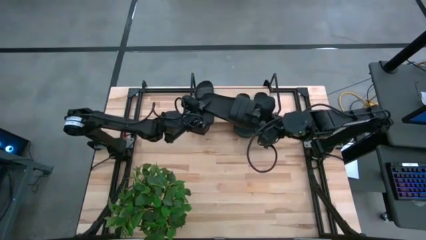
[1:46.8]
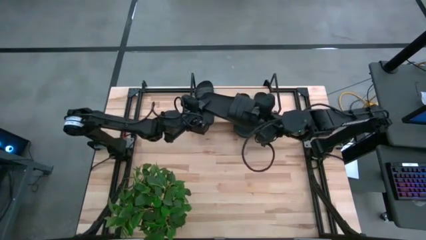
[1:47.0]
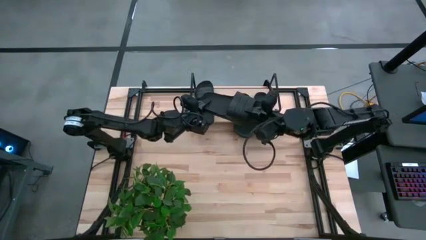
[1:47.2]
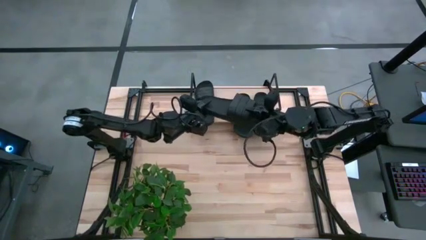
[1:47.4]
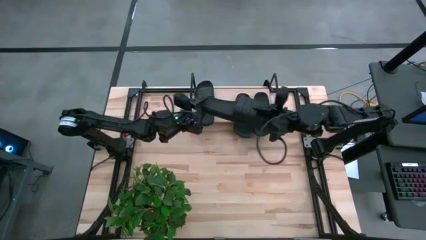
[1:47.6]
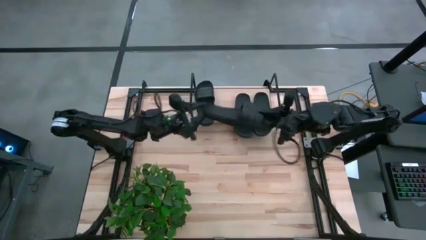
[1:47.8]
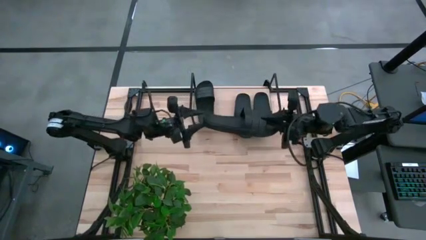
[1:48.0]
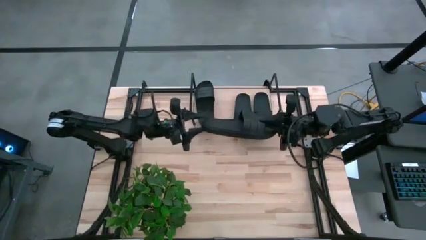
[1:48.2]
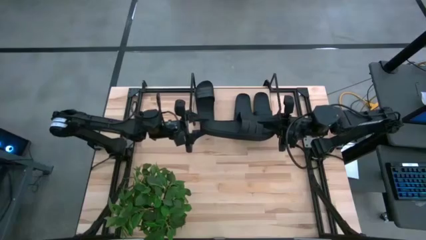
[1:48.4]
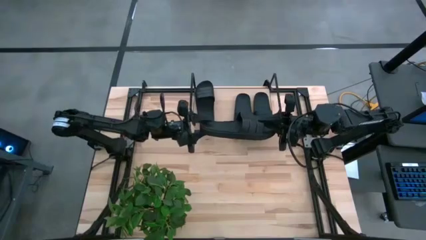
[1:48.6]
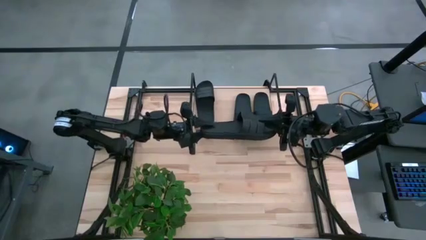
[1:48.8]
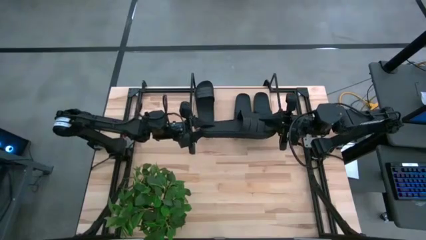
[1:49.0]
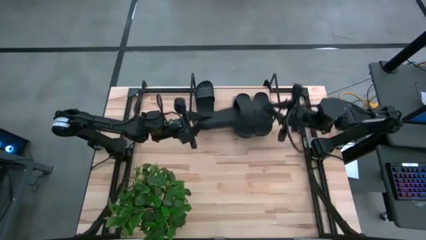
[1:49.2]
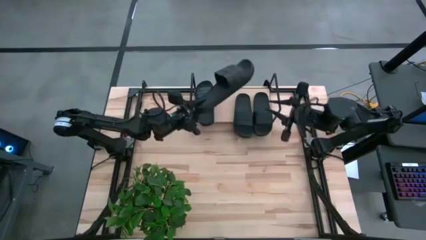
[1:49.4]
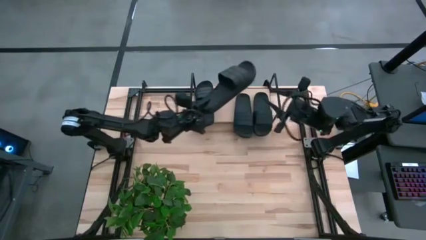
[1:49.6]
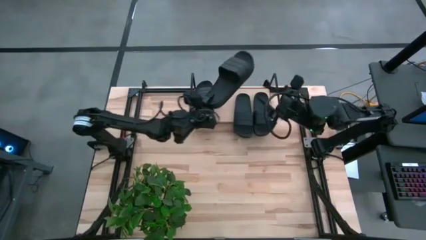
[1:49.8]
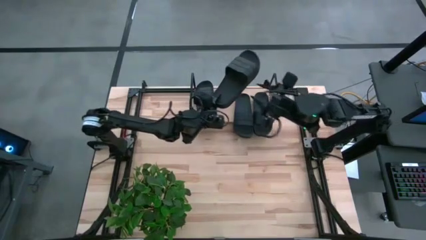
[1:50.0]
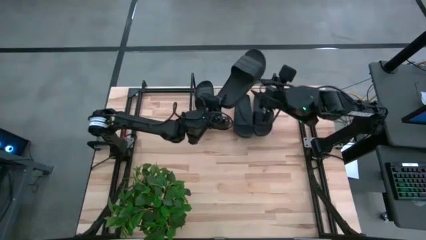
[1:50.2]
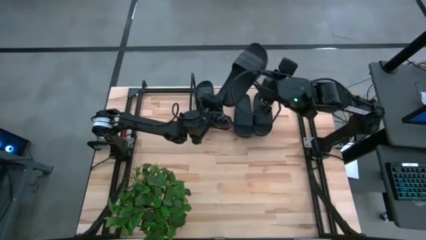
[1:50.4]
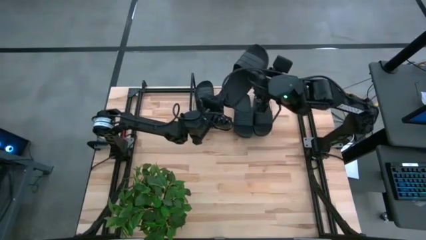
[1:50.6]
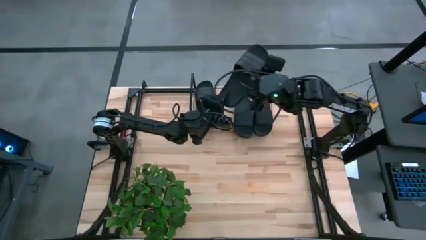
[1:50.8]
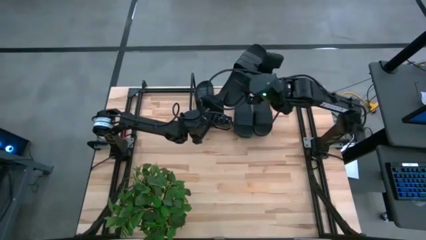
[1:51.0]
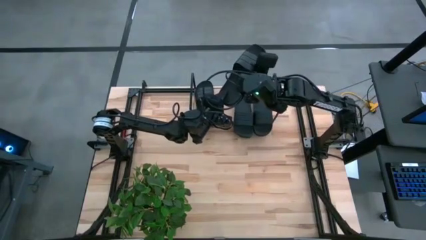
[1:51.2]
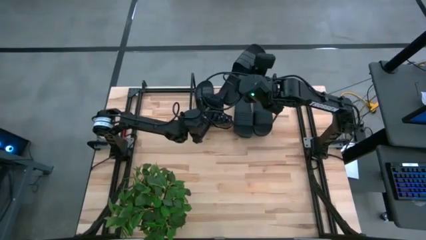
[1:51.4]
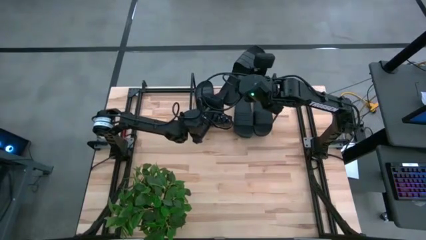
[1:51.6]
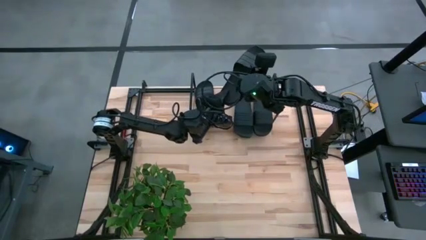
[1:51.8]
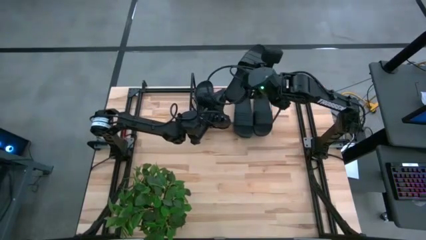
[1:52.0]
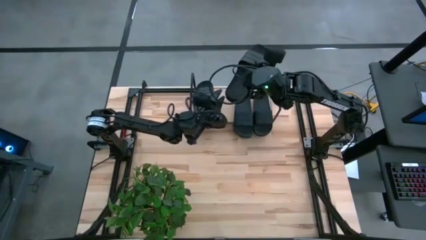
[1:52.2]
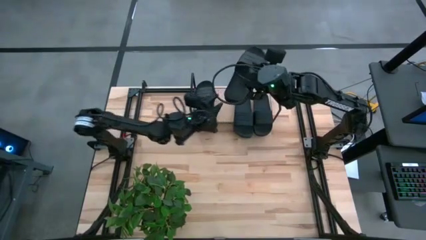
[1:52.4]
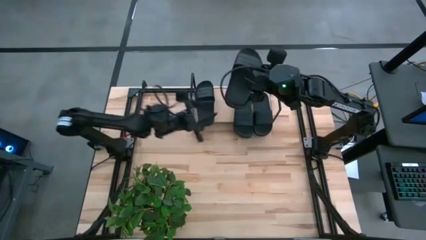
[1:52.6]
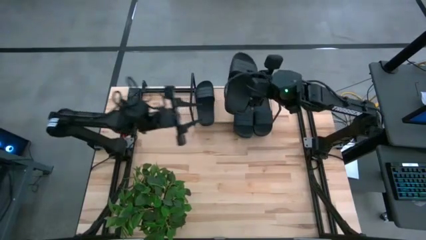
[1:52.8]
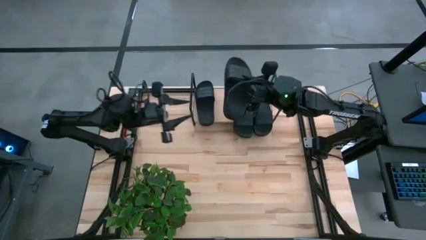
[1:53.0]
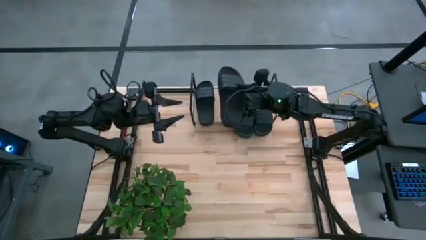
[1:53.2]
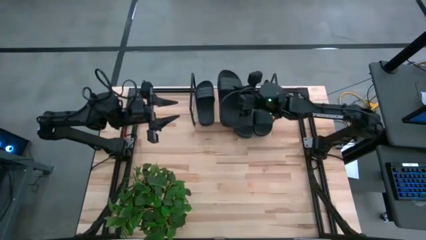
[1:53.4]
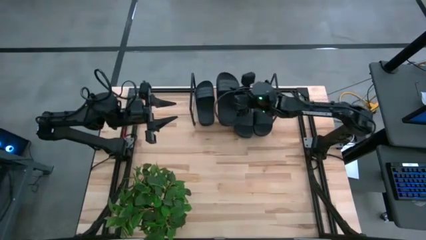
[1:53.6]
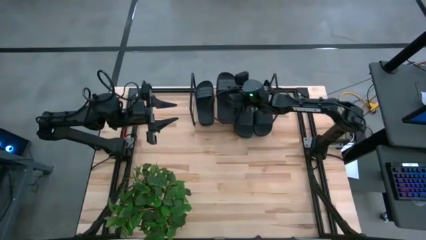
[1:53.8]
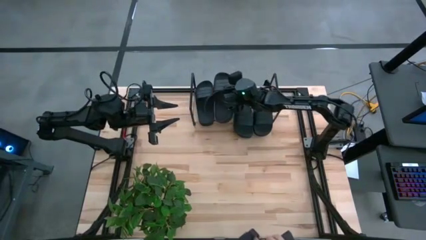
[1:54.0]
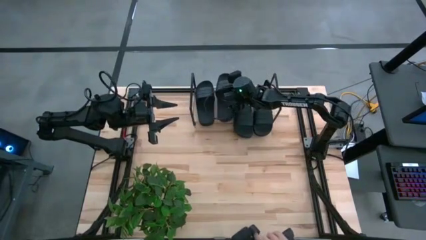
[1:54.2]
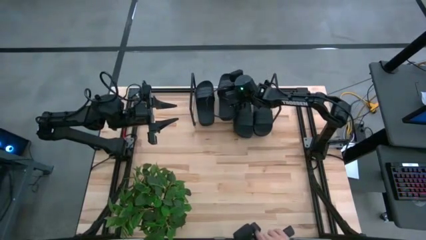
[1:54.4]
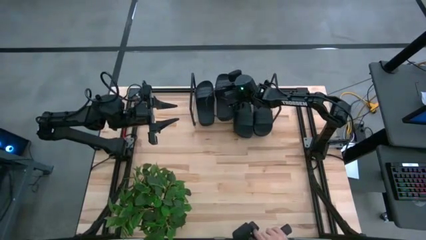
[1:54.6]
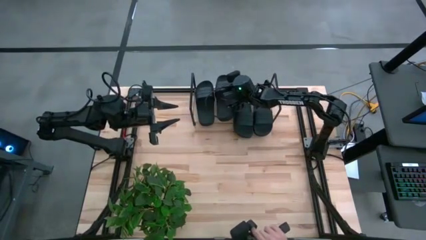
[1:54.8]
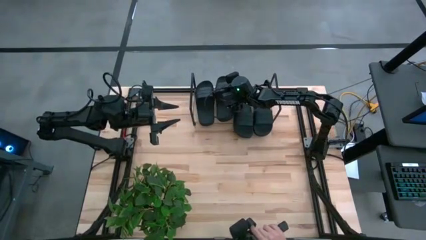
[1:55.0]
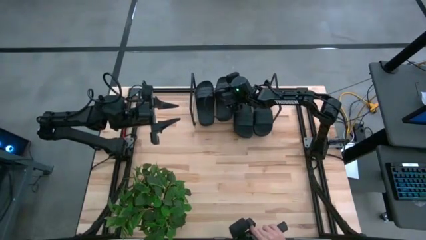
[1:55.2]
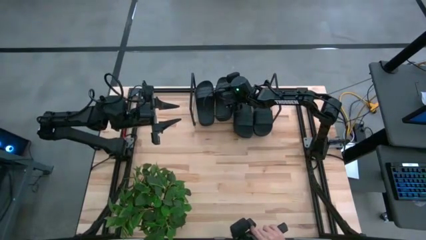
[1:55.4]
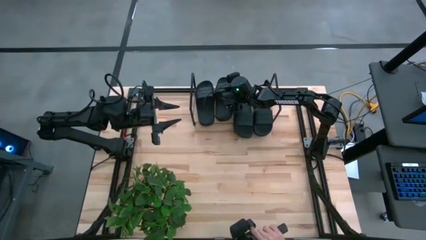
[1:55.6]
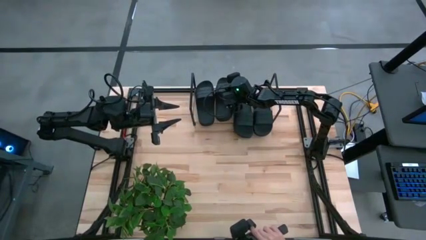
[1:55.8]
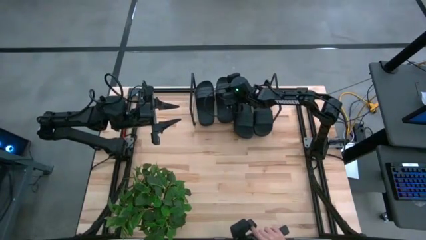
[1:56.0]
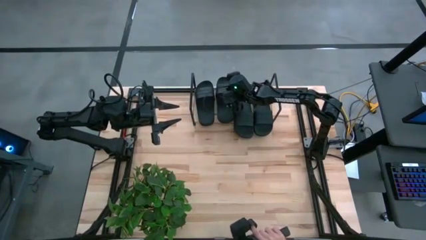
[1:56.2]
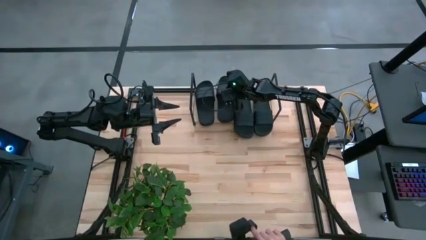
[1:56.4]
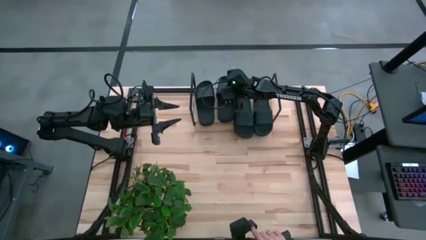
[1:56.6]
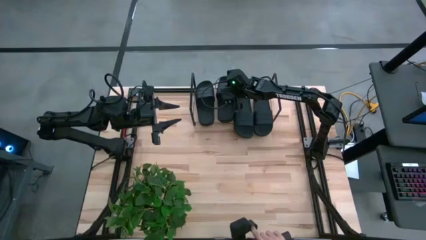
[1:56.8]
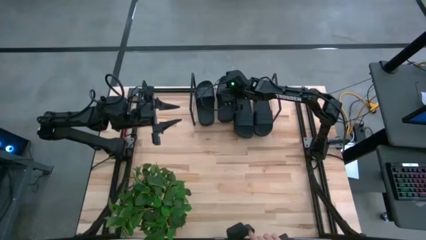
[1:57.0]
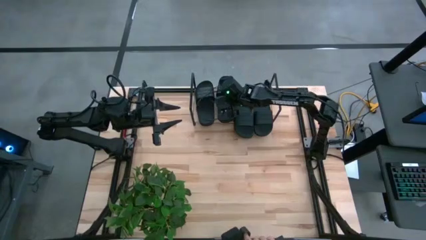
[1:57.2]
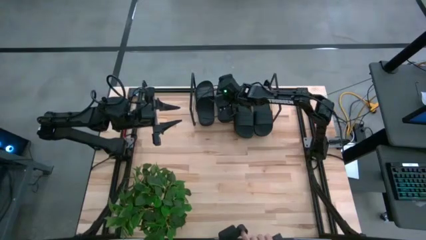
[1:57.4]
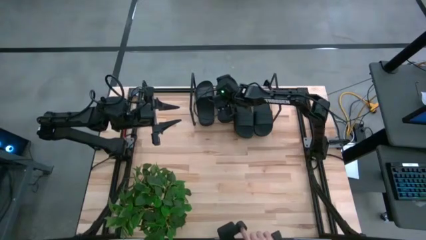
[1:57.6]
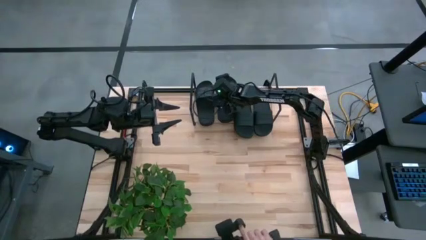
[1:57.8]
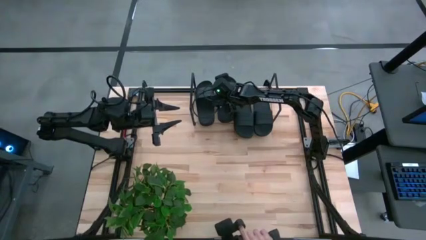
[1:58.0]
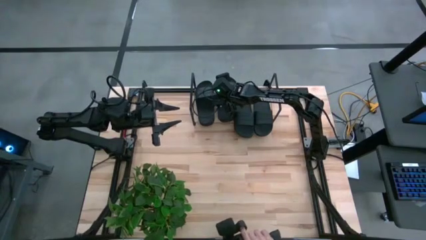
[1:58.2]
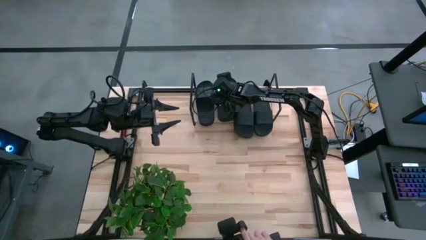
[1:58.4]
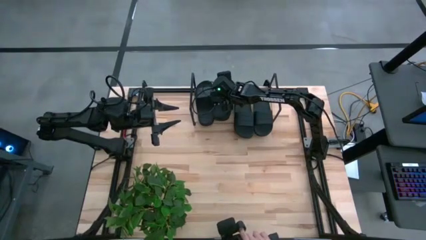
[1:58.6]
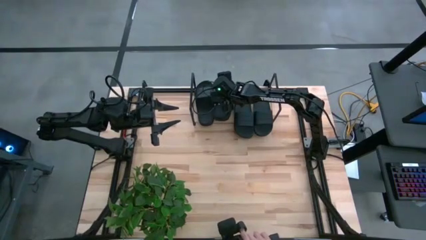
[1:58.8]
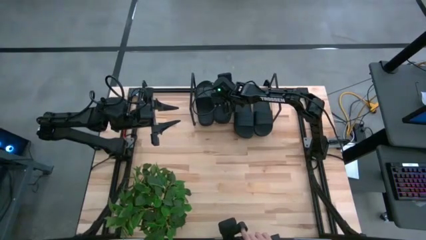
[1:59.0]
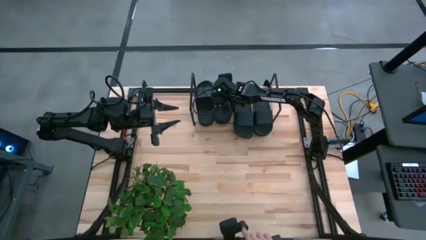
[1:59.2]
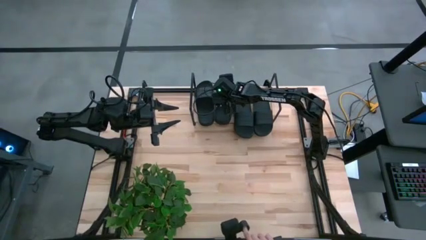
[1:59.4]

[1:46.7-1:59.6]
Task: Pick and place slides into the shelf
Put the black slipper on the shelf

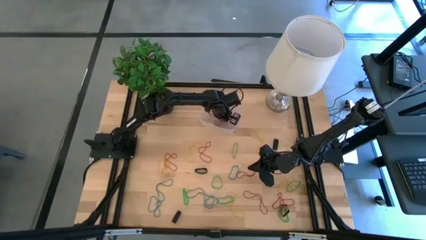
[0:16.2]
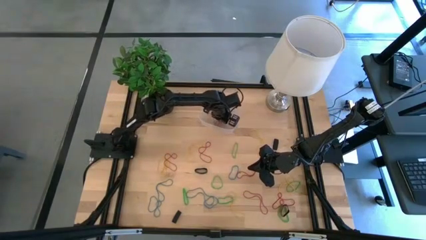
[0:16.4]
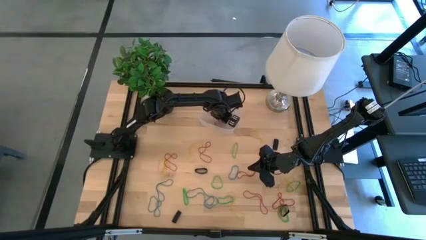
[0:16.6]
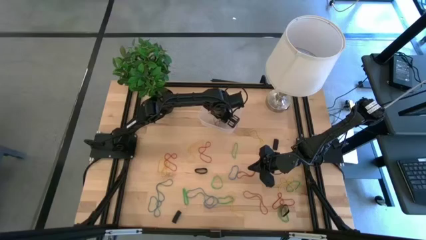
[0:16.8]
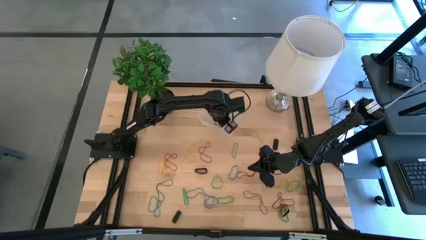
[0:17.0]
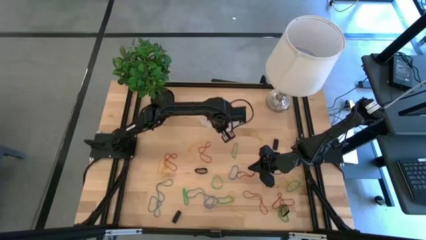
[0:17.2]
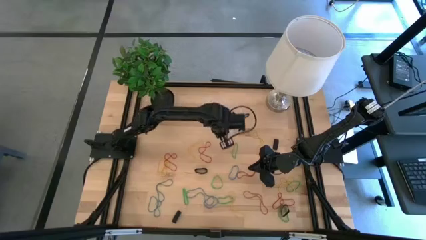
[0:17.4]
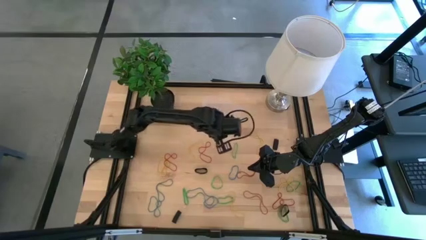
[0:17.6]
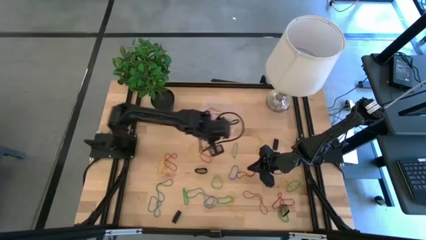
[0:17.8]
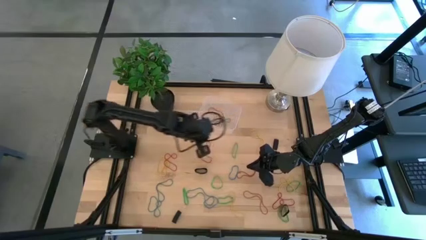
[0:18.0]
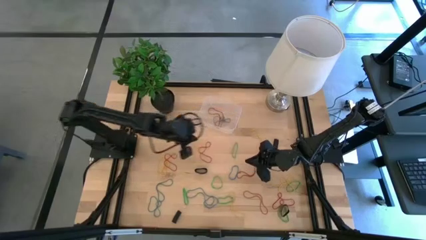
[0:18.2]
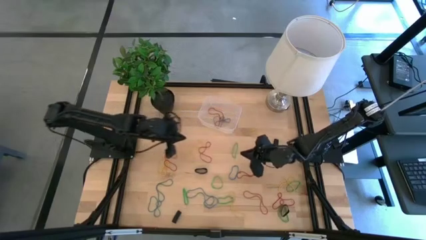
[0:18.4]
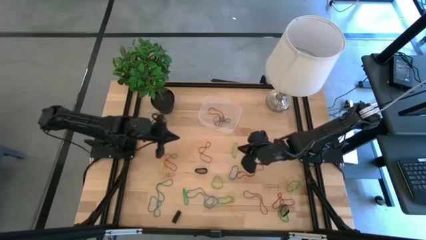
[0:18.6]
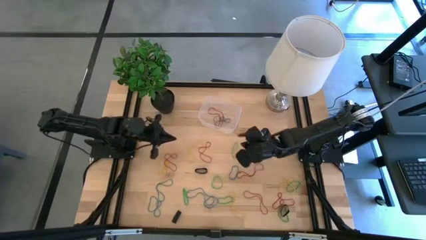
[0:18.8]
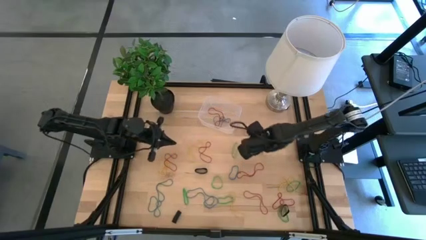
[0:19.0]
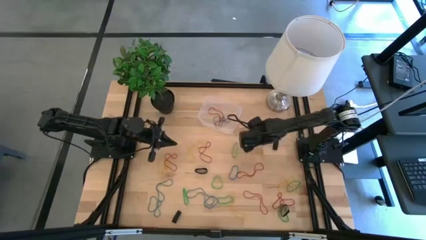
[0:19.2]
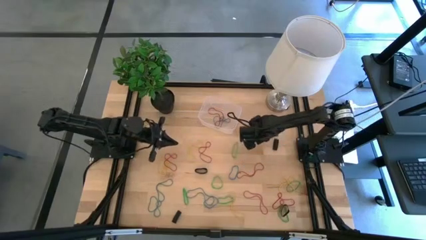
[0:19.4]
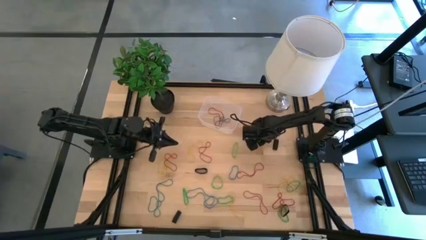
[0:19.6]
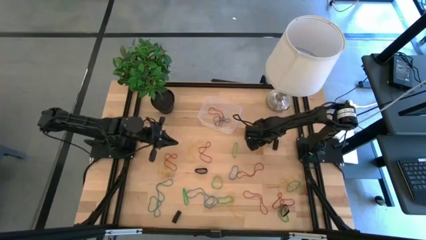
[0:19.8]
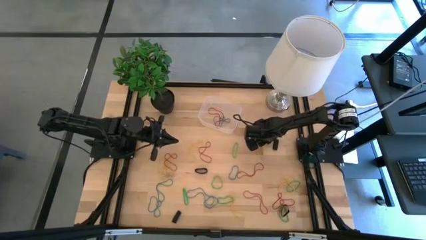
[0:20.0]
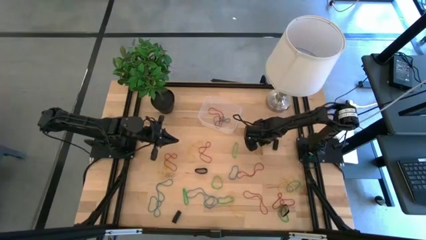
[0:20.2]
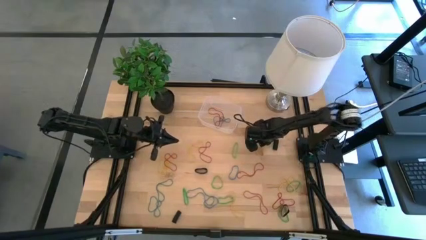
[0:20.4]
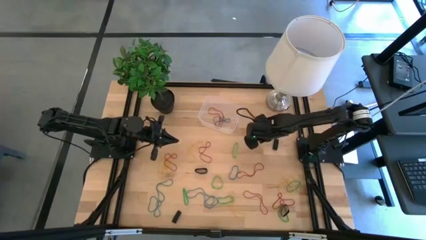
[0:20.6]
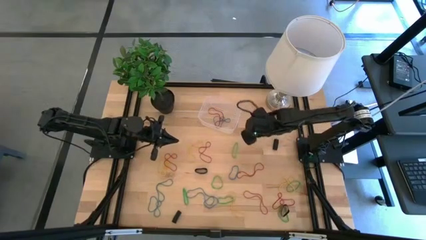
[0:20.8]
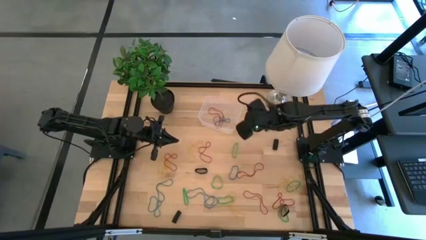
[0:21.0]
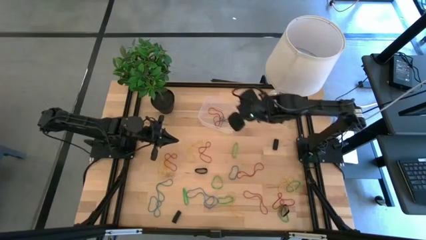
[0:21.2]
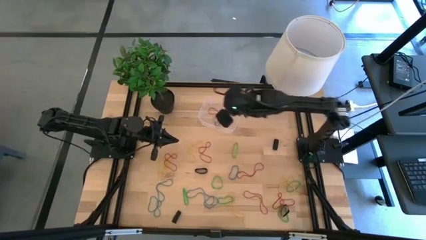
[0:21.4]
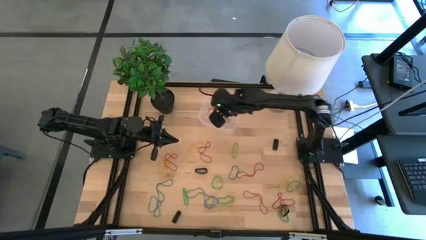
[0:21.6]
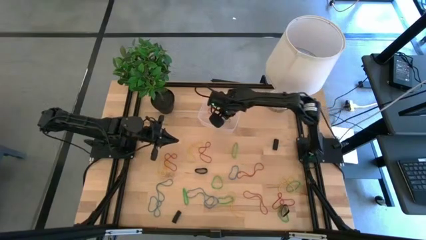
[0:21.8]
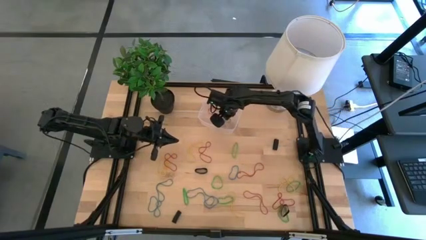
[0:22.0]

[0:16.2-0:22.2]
Task: Pick and place rubber bands into bin
Put the yellow rubber band into the transparent bin
